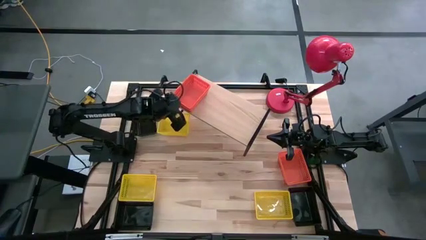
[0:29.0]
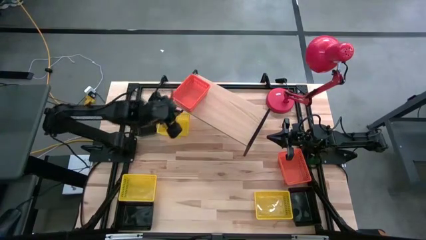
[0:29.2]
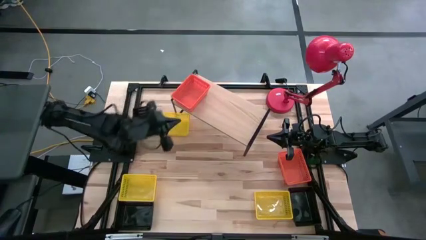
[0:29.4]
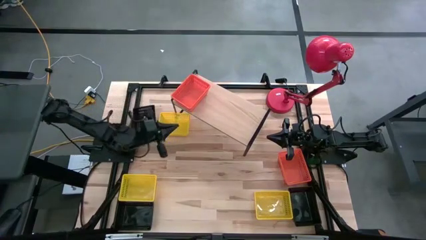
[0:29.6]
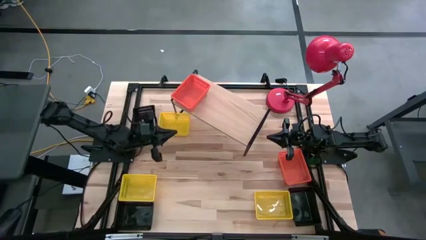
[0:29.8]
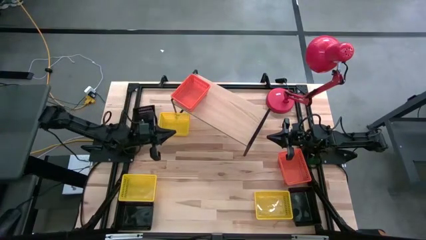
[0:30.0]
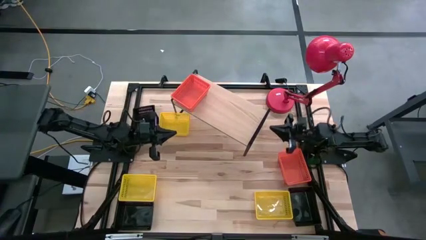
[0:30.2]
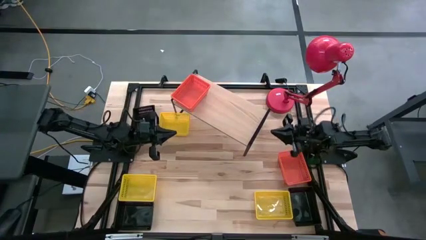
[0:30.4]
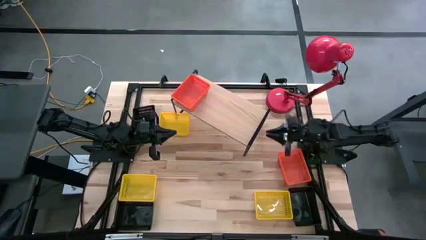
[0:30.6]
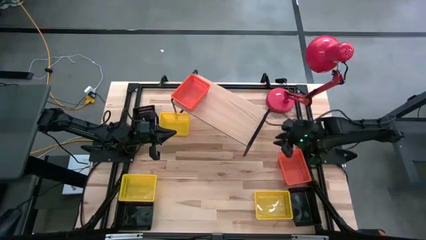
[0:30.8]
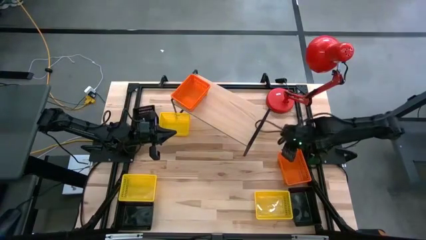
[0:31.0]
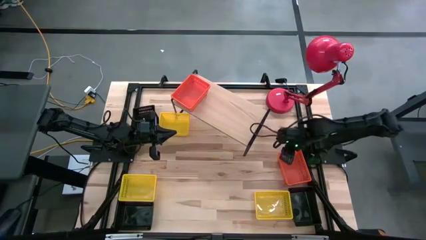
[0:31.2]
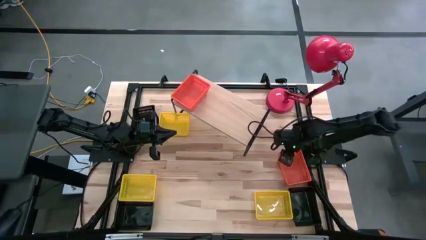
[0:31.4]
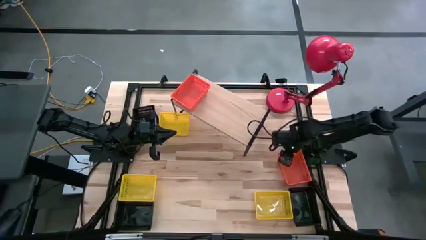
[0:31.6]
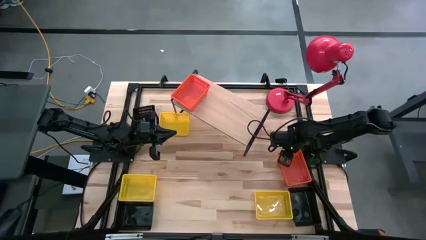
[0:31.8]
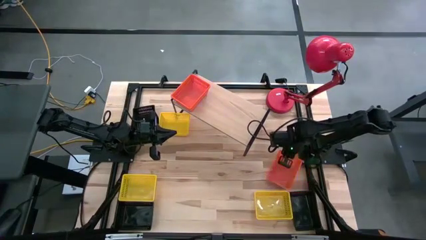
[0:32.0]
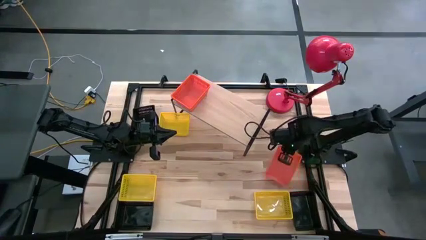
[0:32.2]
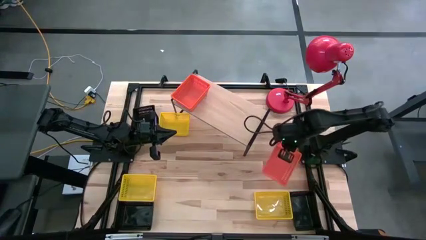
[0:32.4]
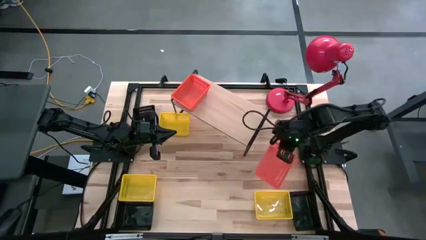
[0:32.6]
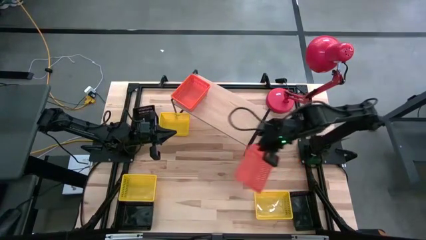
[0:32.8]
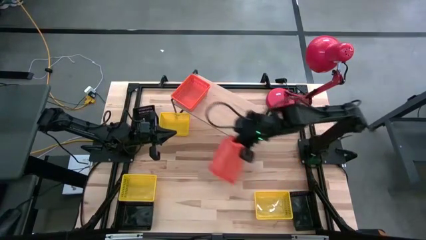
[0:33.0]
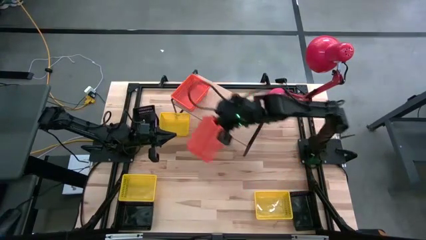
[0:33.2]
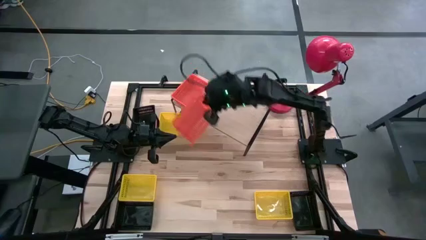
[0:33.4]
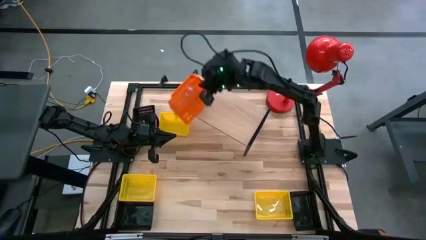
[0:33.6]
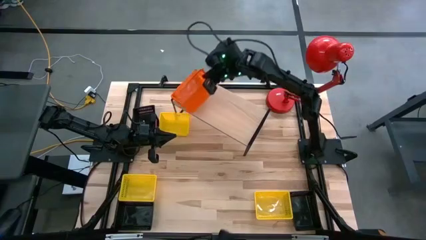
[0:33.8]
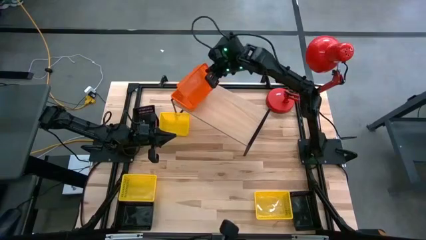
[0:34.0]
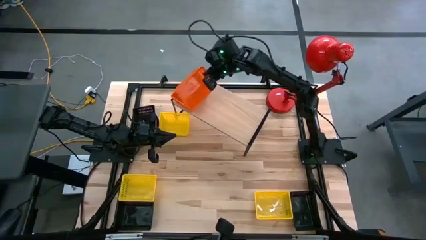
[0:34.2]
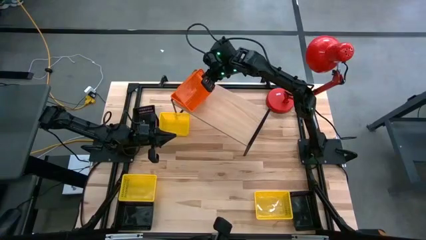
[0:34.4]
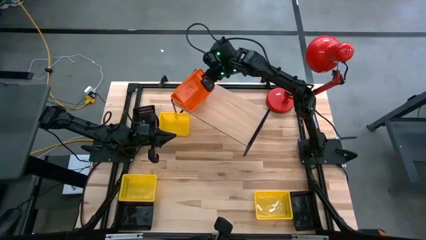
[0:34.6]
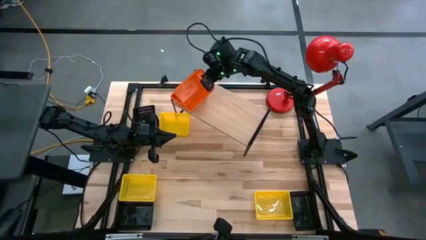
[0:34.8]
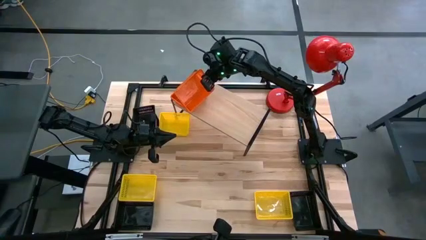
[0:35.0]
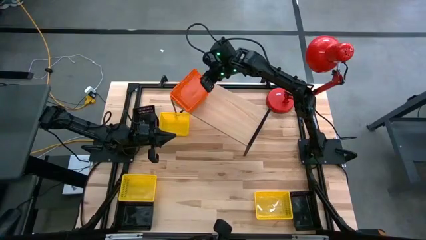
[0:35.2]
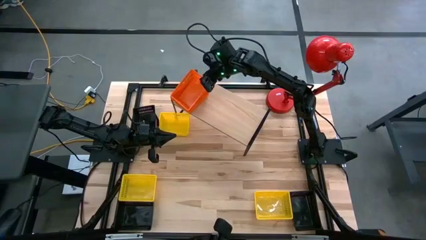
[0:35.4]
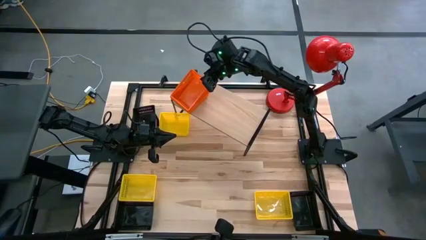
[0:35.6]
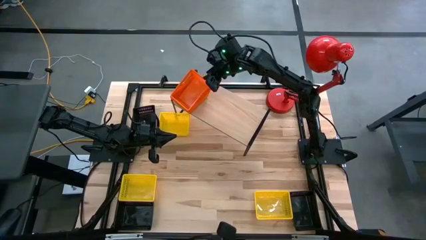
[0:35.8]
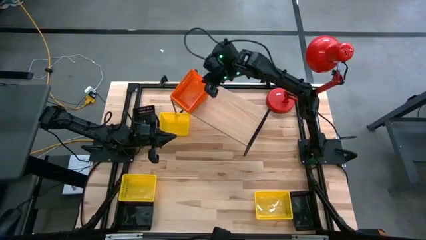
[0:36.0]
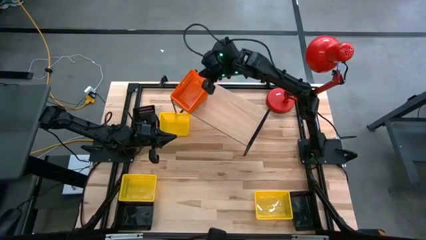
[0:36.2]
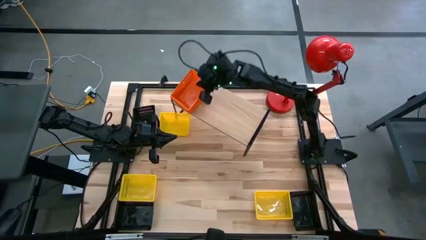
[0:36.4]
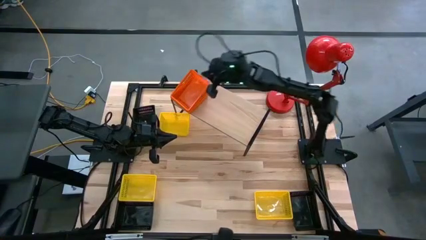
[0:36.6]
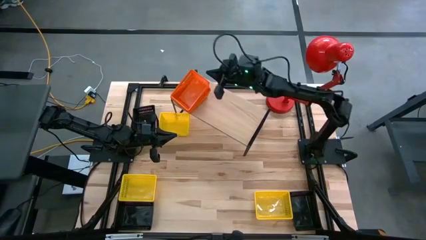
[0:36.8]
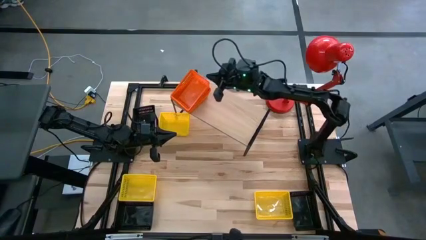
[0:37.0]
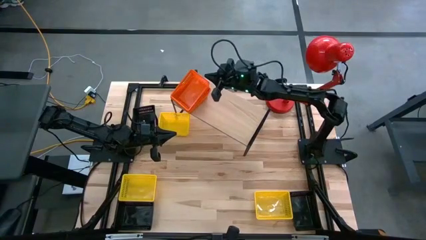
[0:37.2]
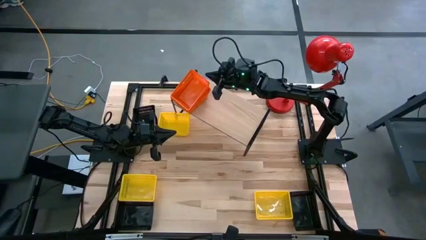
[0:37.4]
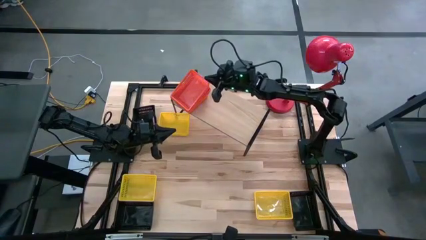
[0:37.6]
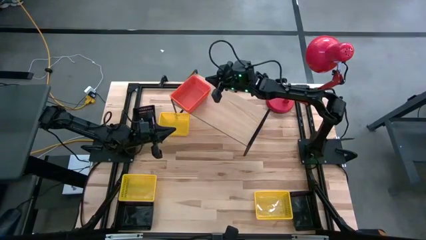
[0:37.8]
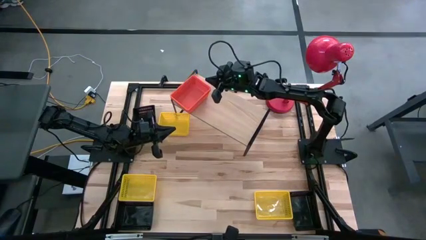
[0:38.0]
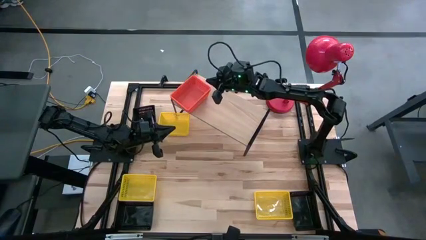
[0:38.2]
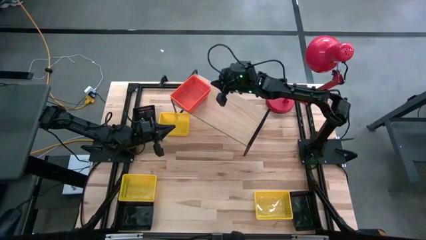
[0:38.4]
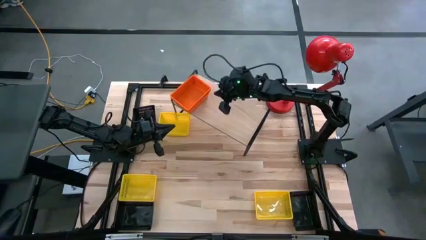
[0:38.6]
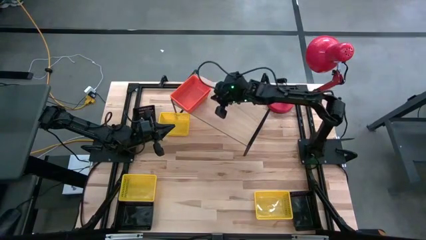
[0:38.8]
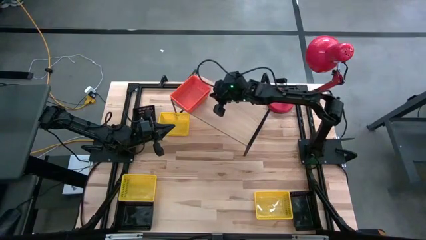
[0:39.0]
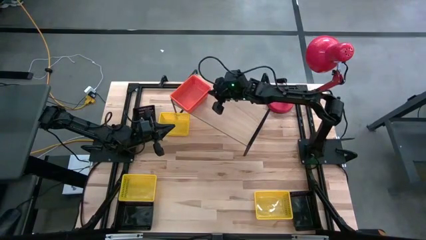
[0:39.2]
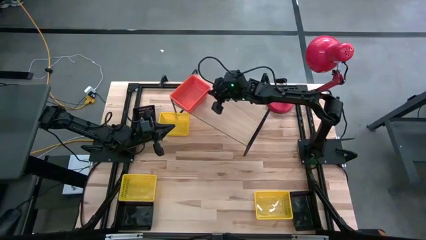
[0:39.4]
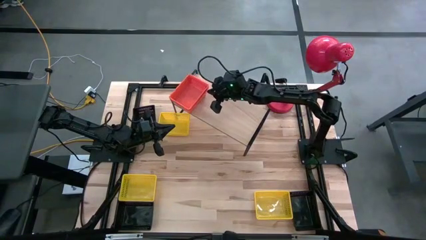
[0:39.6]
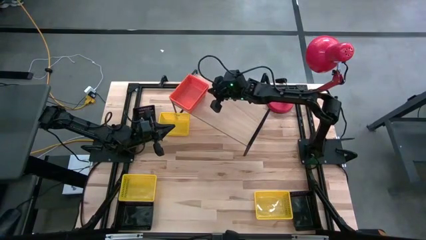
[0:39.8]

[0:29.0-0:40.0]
Task: Stack baskets on shelf by color
Stack the orange bin on top of the orange bin on the shelf
